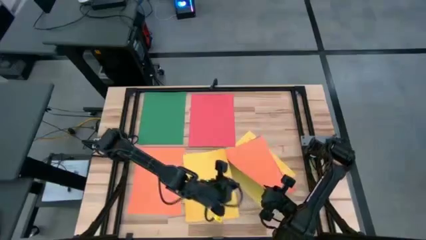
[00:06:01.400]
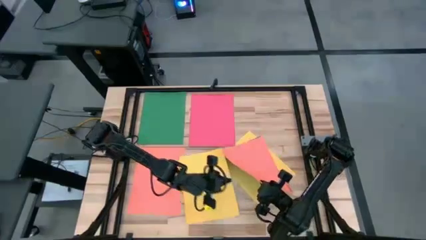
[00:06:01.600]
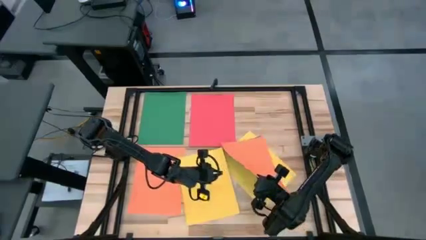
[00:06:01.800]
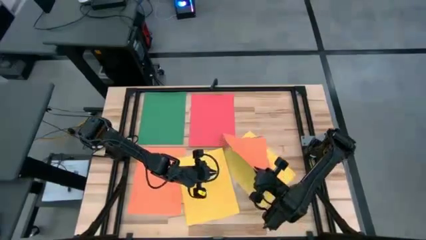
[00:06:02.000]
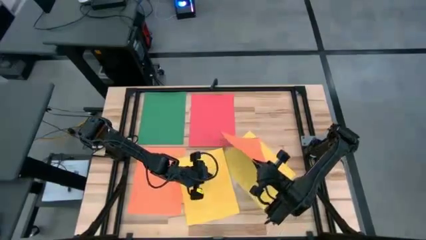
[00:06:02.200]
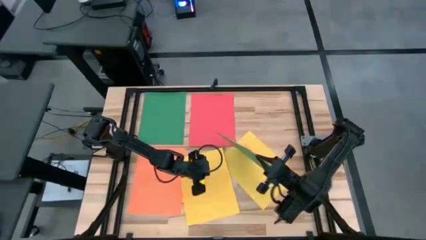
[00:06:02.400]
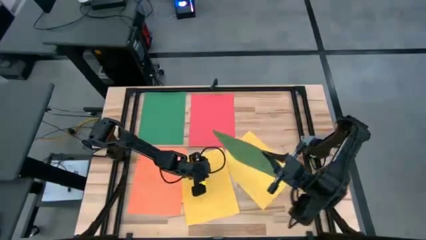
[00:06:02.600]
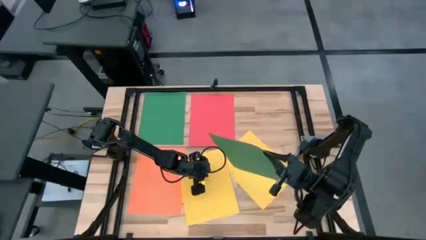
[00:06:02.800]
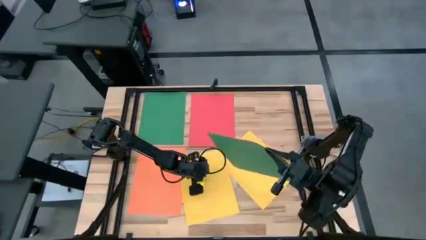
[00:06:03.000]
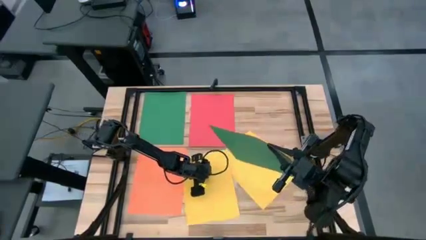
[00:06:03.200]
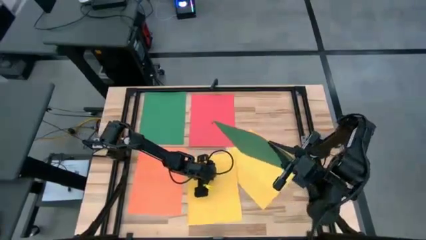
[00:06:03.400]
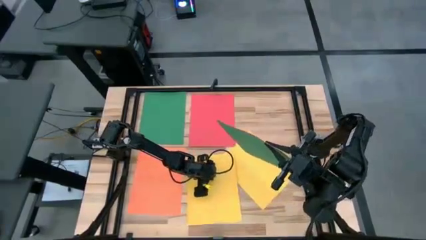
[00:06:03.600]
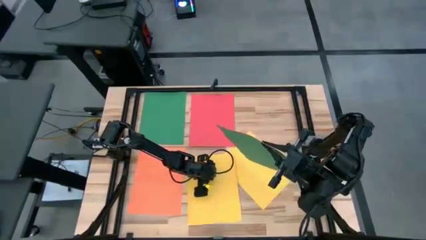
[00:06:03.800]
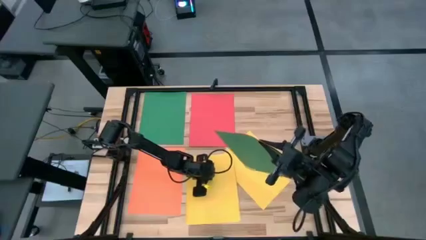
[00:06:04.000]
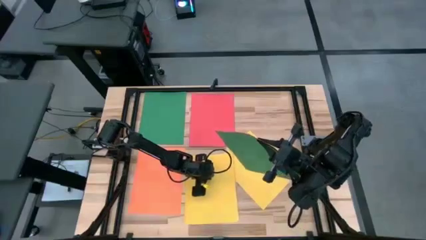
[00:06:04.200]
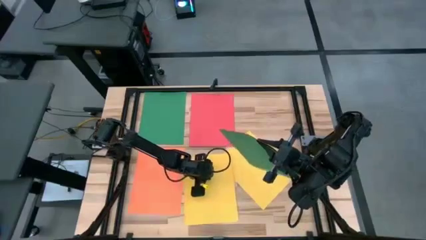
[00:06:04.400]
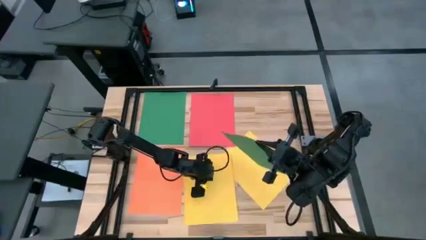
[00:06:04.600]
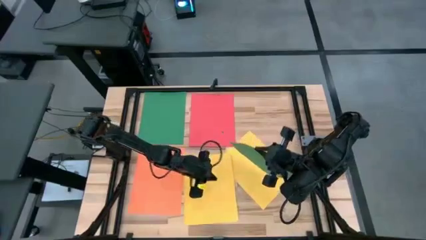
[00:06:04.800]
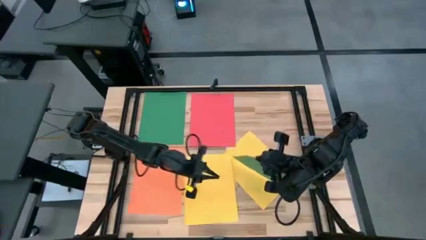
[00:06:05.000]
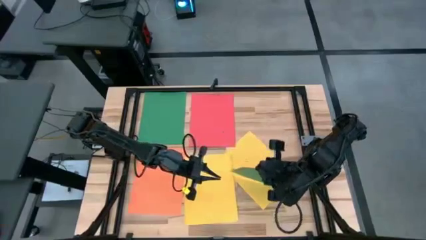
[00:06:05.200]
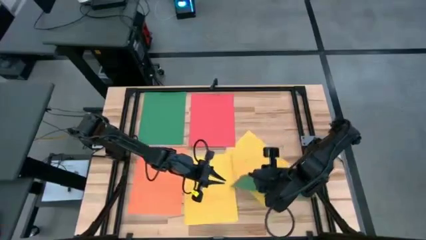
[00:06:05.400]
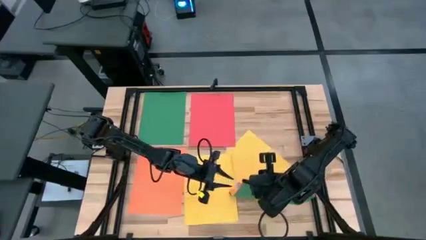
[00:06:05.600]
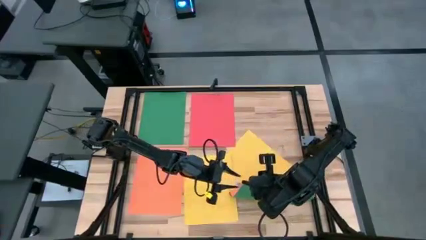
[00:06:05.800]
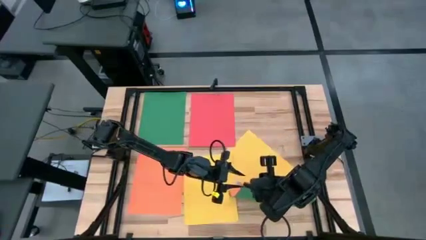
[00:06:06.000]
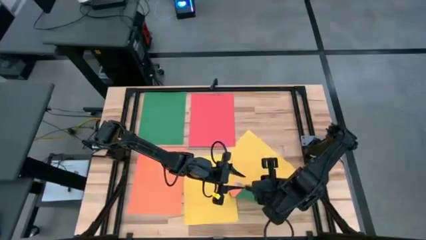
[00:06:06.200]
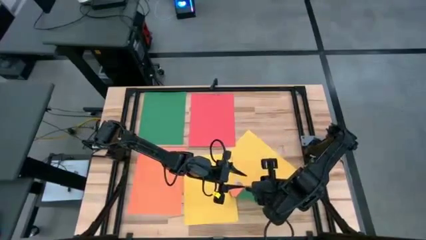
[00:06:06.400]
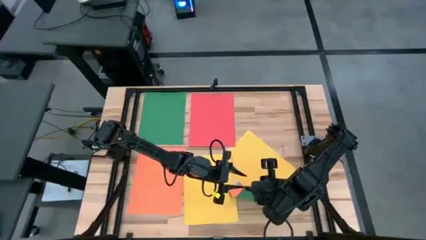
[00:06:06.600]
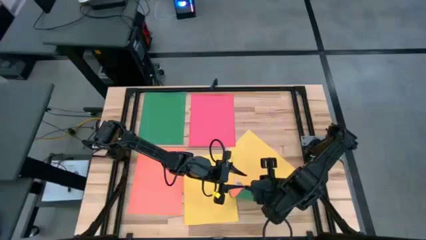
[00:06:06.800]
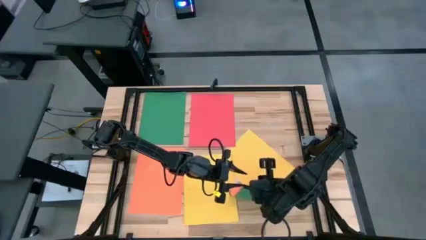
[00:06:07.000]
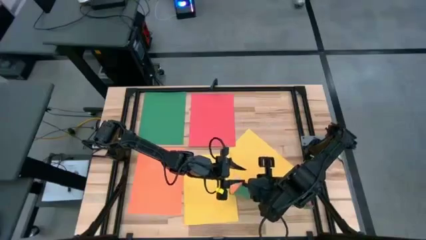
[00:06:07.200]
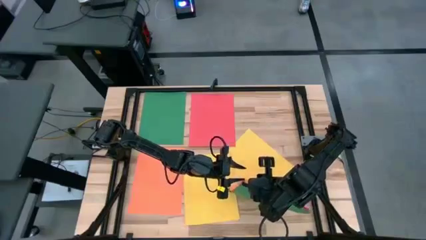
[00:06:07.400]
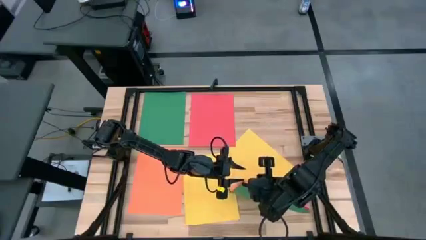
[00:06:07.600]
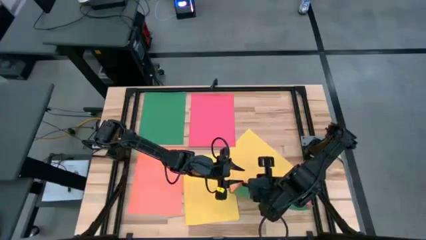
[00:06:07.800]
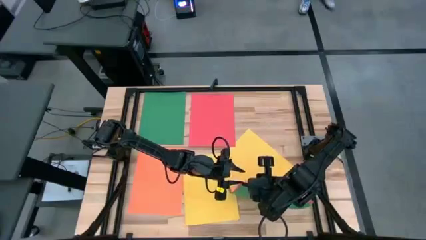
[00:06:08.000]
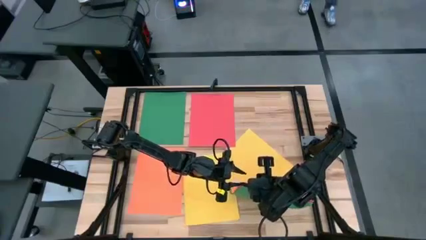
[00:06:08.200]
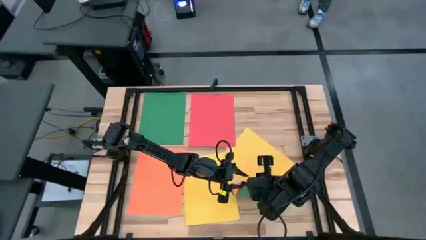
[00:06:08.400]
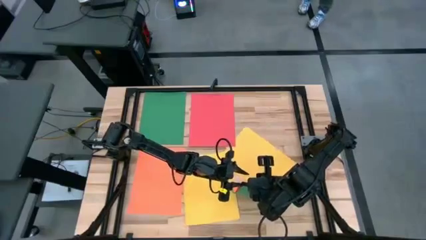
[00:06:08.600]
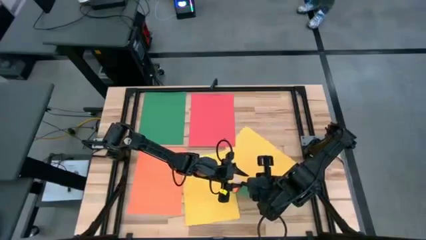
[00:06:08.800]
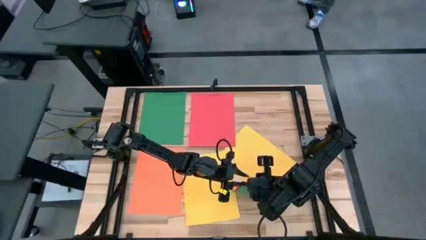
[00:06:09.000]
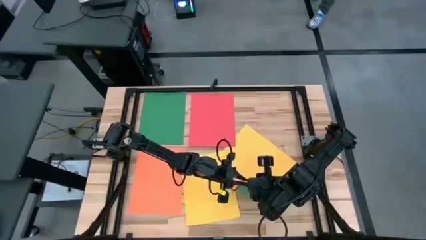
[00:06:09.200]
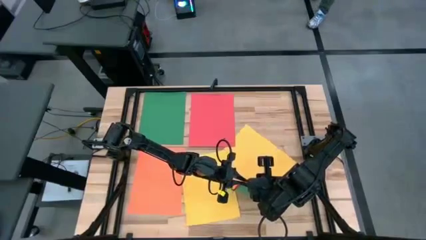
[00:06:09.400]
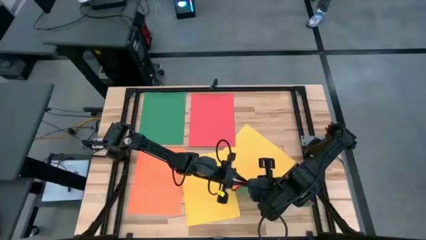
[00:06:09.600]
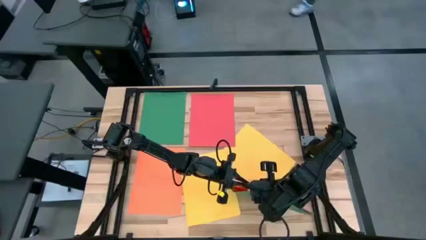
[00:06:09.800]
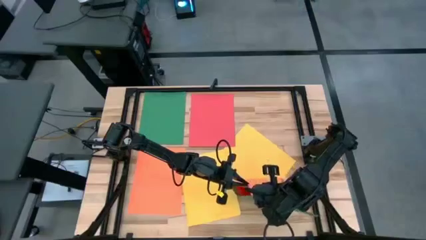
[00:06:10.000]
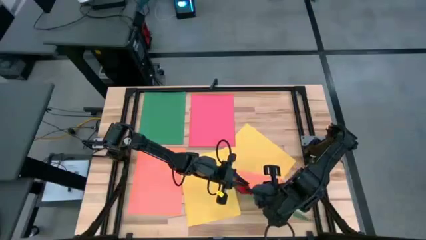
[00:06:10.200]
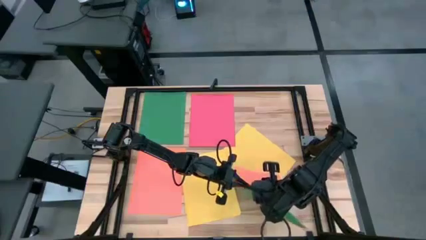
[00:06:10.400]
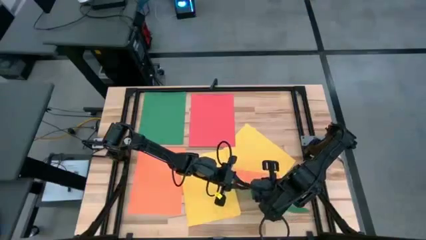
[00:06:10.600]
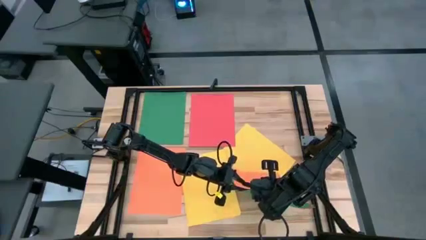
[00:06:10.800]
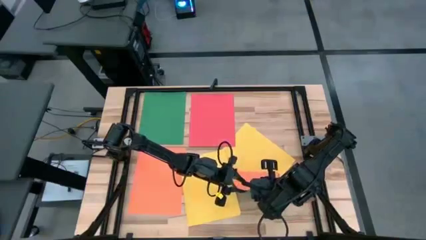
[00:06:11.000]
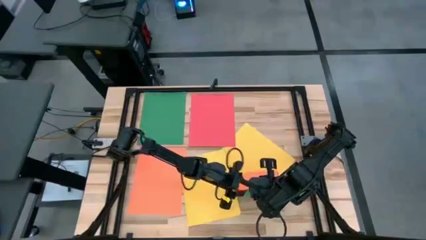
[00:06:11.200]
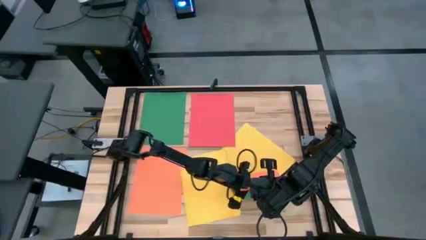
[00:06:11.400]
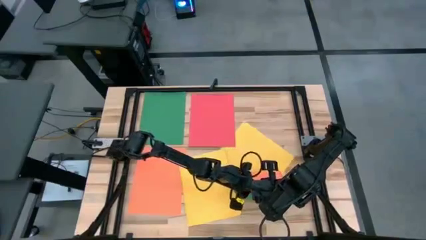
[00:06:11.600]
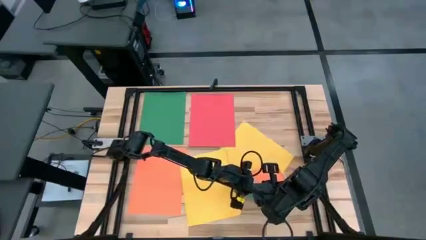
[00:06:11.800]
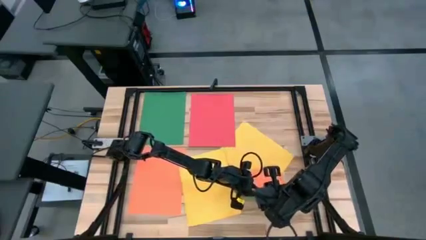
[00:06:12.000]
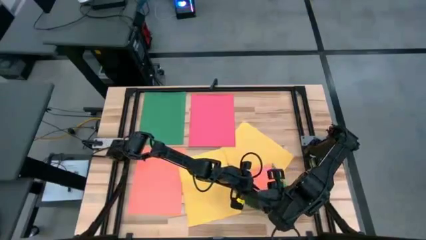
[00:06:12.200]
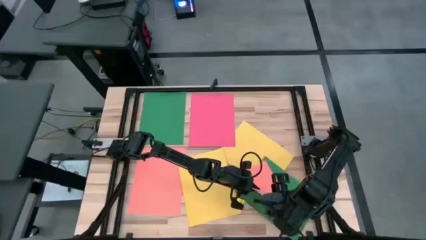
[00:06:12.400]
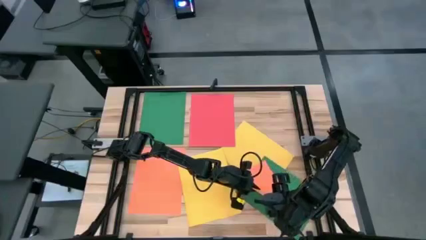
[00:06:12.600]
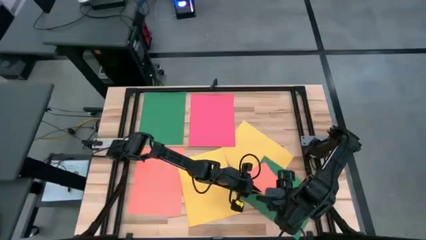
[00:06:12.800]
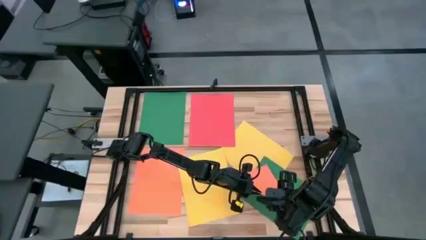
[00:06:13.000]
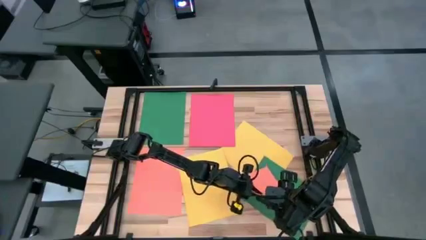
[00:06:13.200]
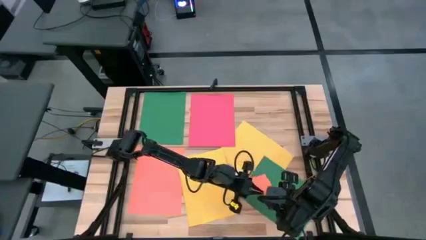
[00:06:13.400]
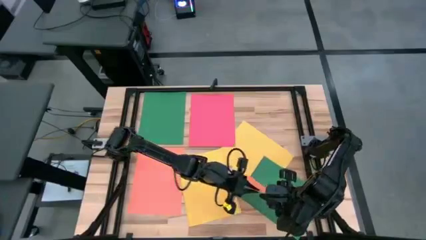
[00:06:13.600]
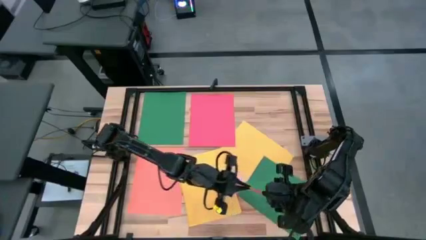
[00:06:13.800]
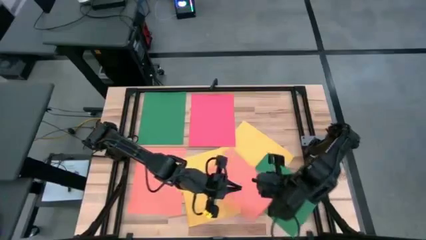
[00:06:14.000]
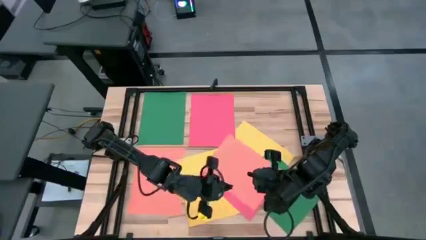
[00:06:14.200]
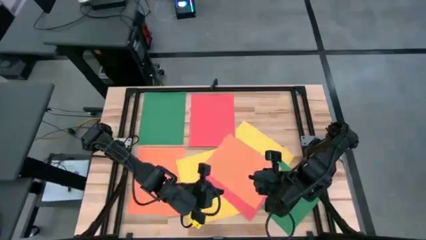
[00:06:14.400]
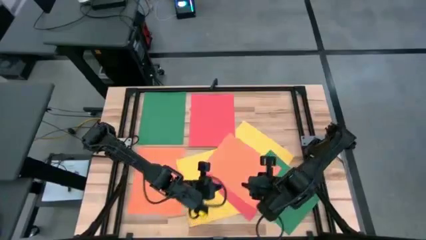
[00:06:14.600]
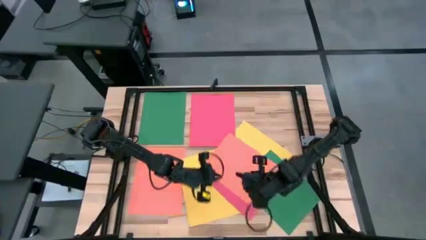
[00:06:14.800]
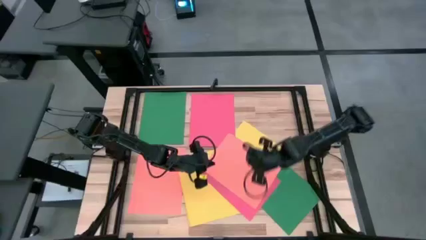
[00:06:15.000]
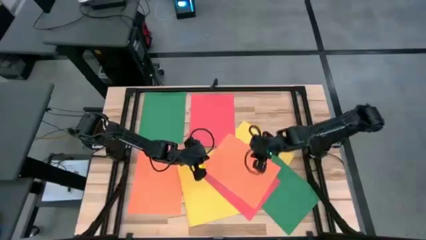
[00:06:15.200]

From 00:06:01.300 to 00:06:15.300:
Task: Organize paper
Stack the orange paper on top of the orange paper
